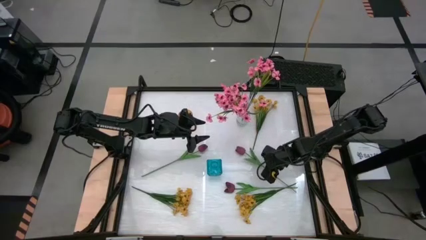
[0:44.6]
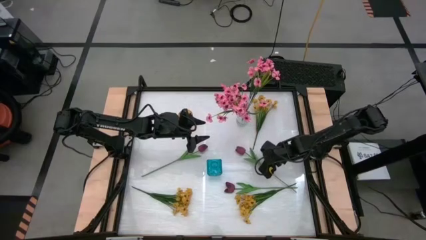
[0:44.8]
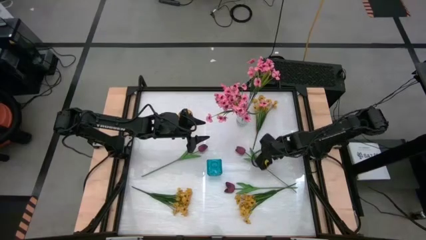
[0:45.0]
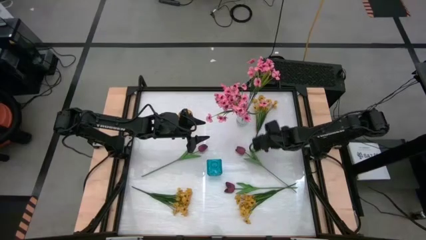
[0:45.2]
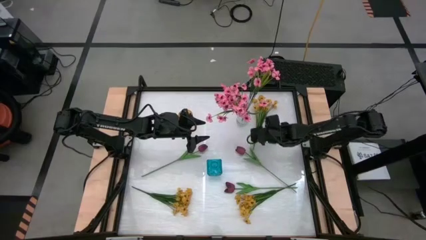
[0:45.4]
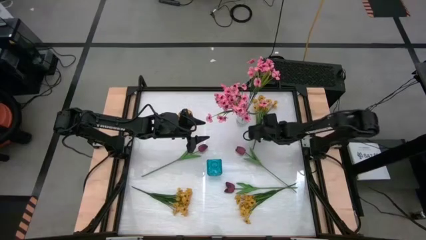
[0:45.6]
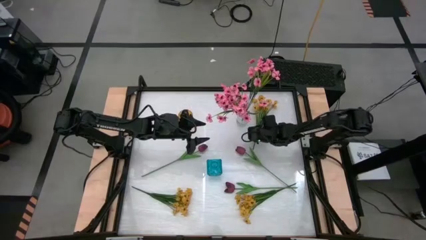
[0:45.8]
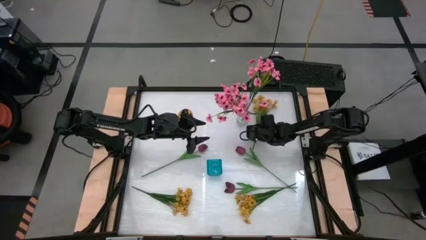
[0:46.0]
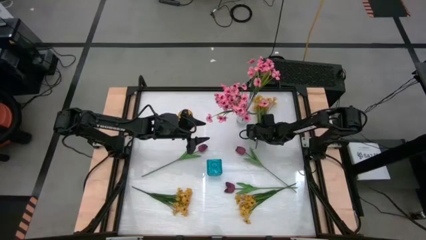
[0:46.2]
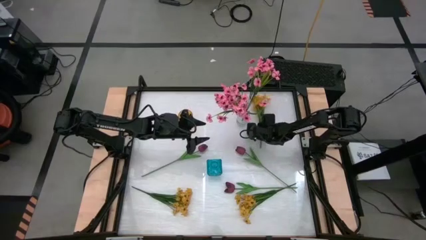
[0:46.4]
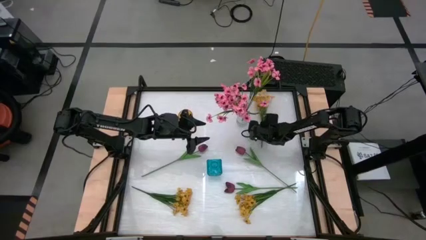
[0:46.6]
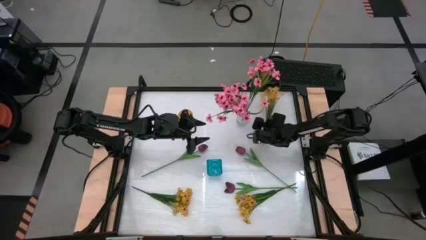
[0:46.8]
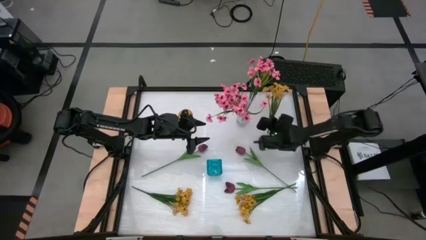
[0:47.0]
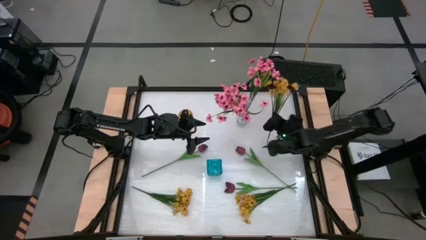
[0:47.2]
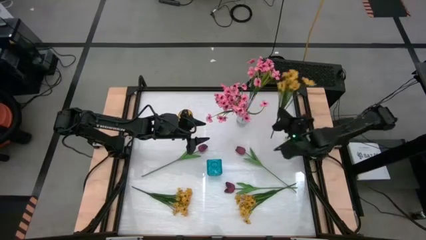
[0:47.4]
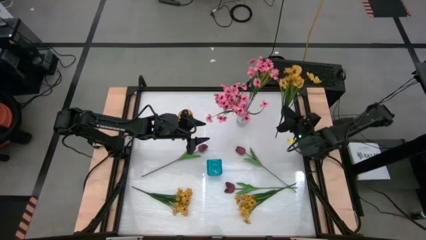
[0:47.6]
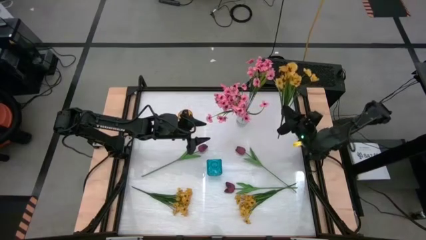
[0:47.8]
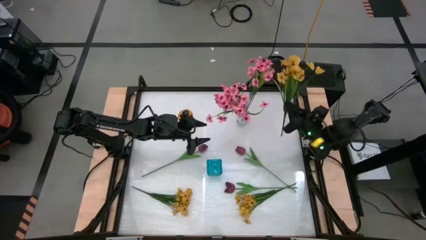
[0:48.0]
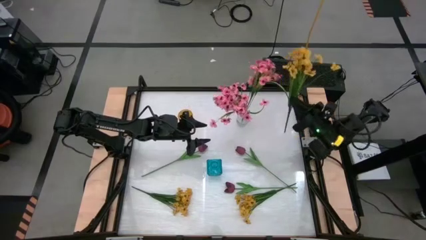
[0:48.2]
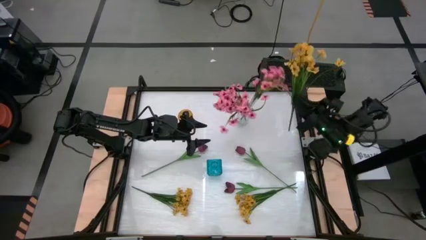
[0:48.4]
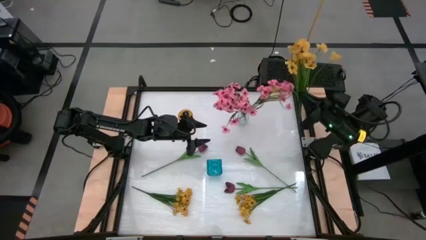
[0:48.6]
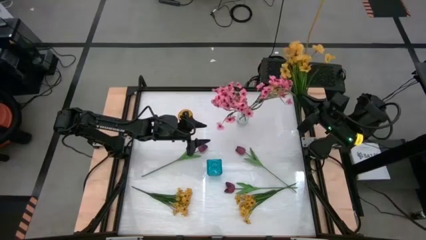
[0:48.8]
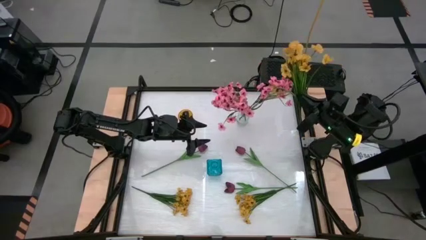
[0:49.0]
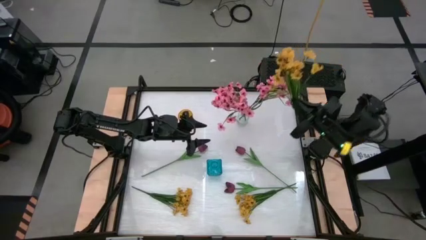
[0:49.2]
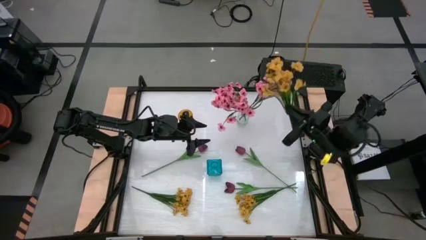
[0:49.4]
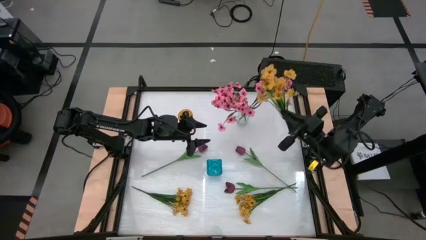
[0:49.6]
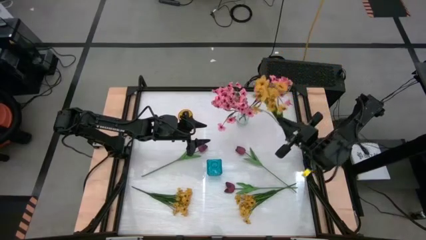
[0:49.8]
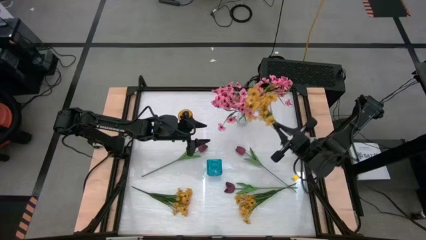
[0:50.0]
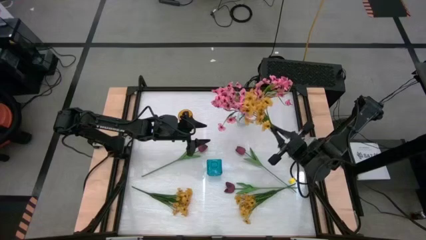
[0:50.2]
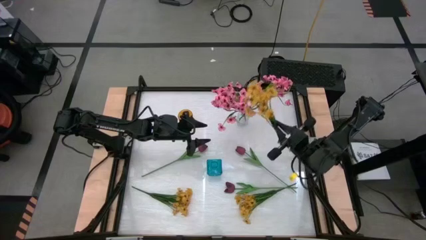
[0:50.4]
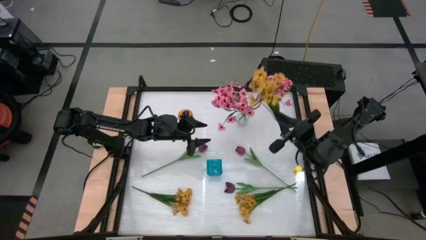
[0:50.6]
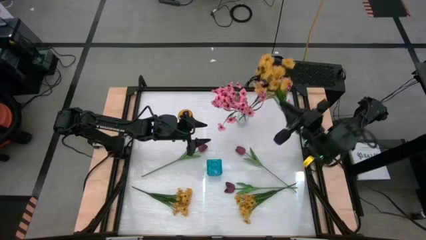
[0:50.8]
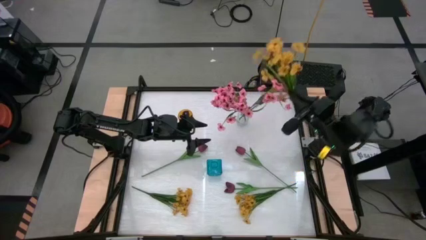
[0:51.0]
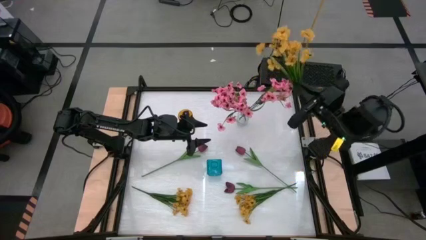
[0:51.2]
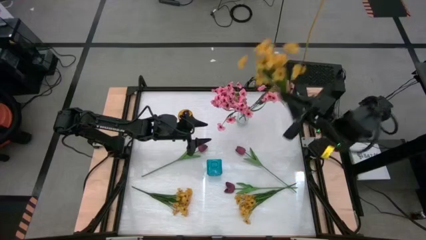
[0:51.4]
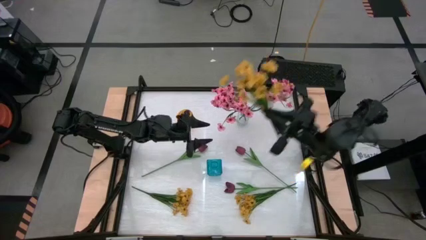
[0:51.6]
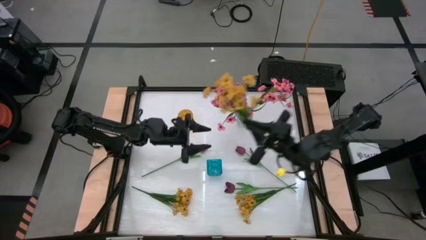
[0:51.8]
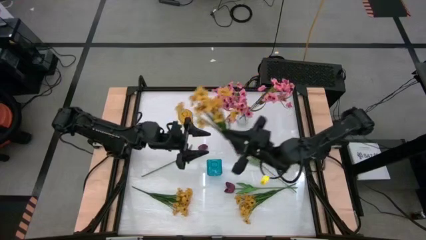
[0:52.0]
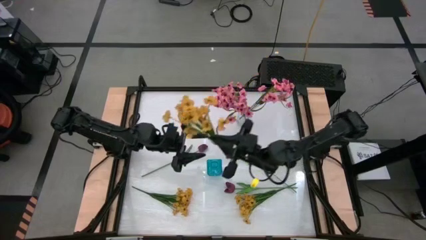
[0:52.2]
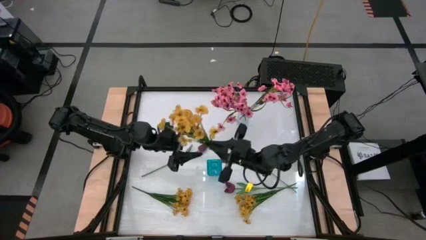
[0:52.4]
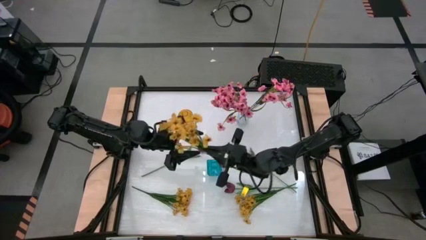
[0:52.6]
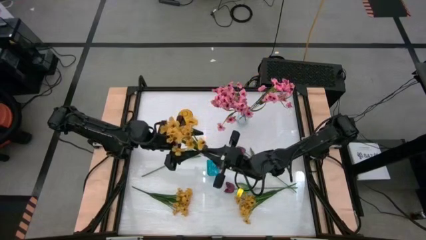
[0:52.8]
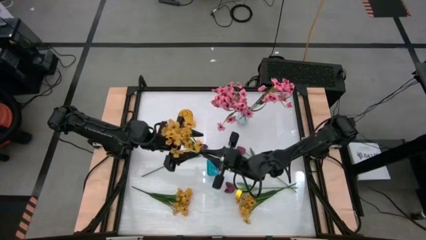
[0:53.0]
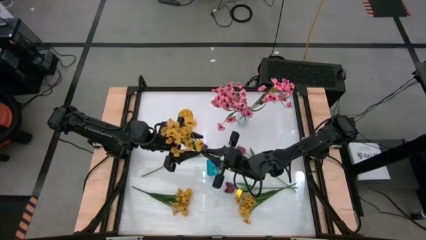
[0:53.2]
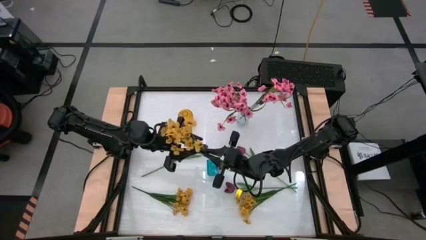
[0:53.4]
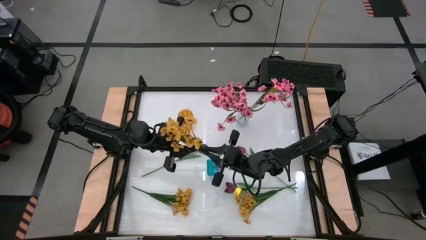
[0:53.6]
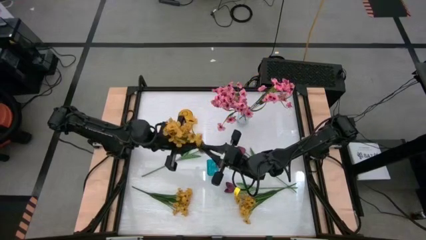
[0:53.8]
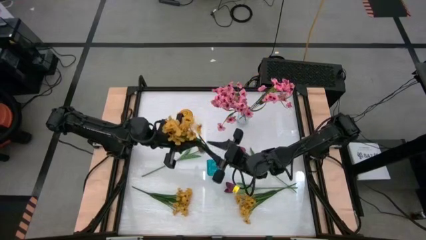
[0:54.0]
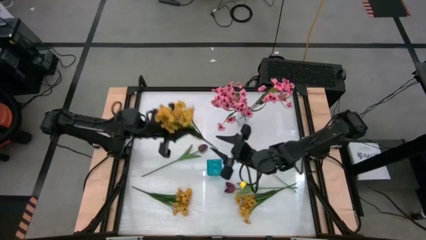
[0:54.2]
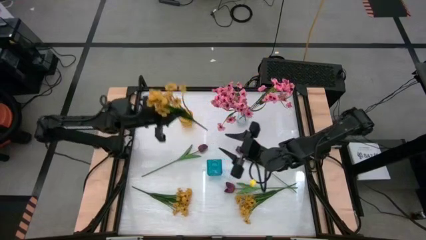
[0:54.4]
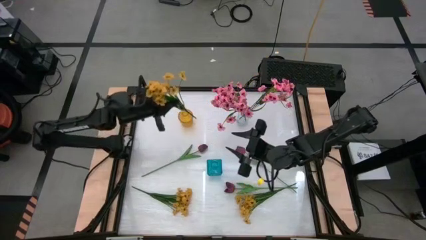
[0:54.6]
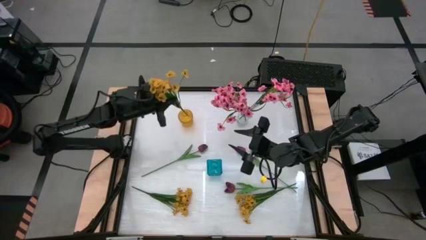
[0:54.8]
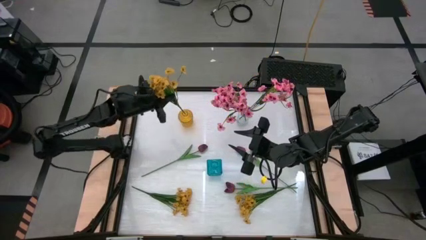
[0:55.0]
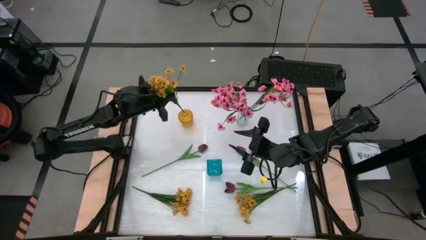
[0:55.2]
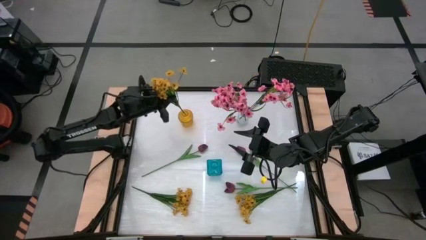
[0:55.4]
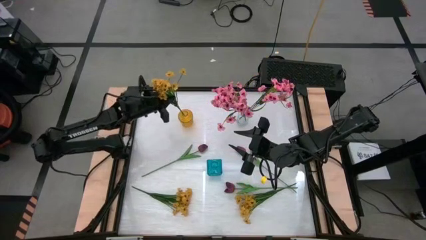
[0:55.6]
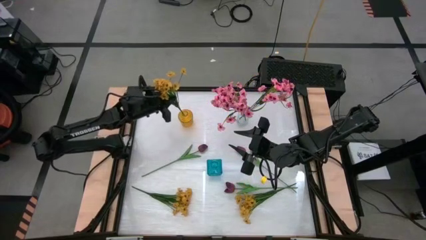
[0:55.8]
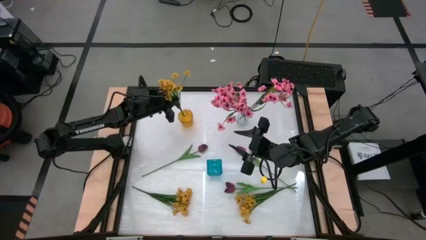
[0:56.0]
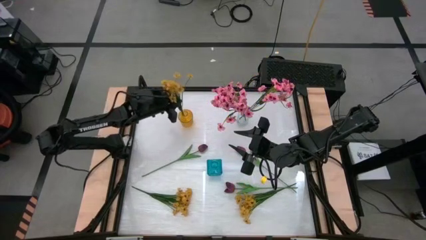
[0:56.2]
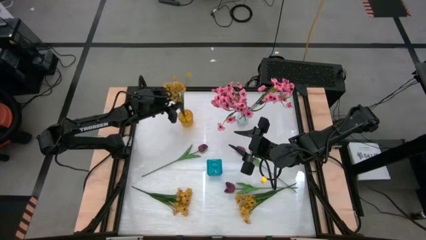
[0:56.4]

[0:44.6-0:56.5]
Task: Sort flowers into vase by color
Put the top yellow flower into the yellow vase
